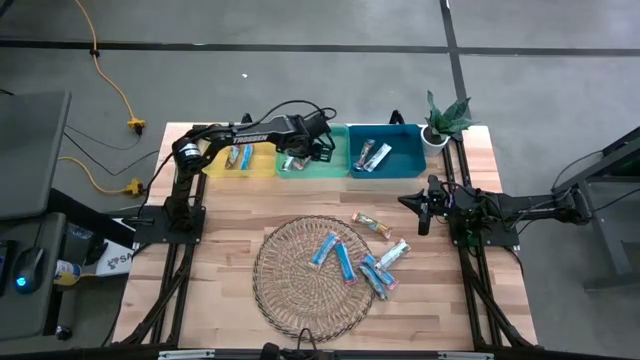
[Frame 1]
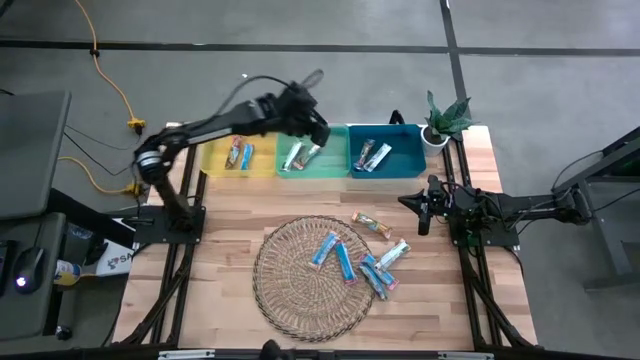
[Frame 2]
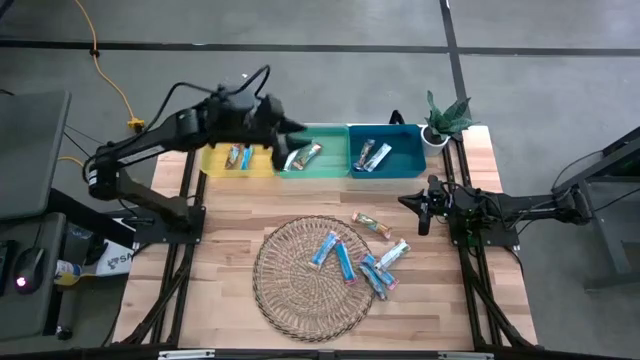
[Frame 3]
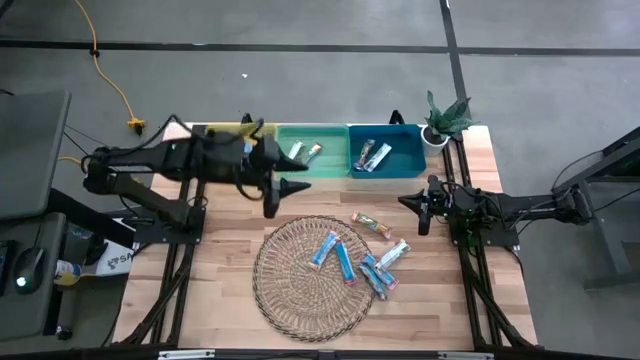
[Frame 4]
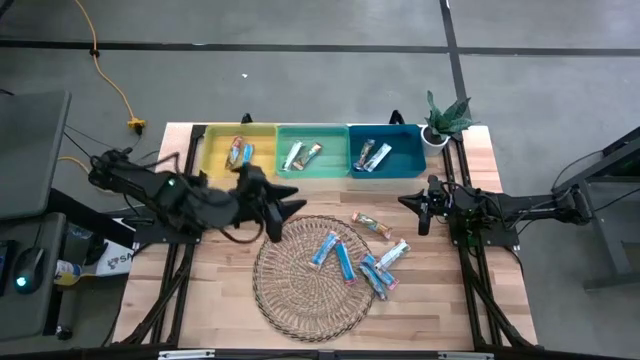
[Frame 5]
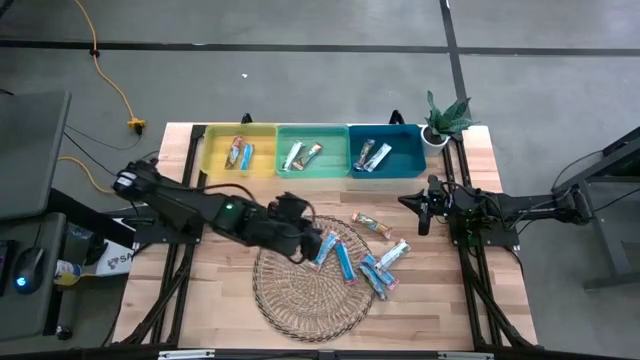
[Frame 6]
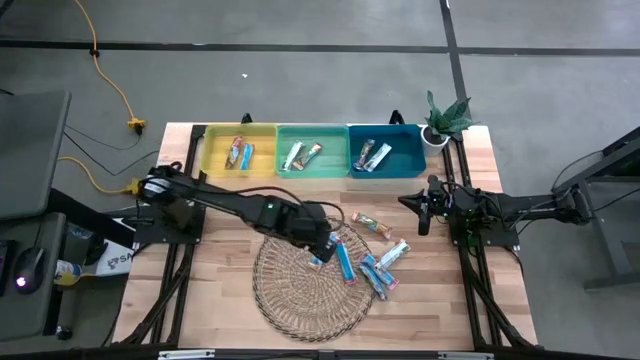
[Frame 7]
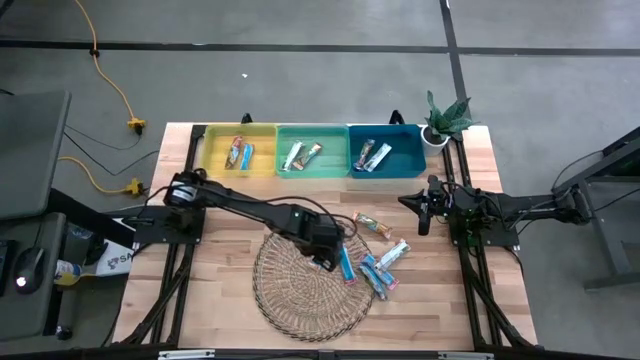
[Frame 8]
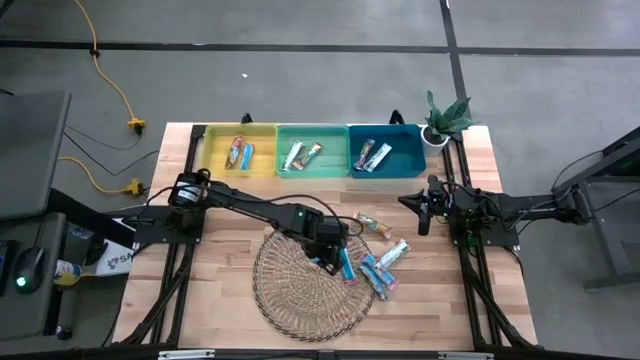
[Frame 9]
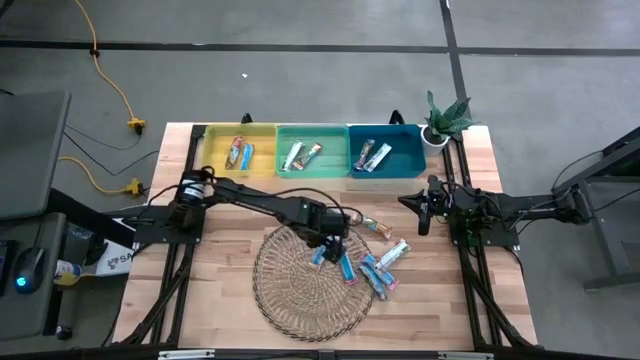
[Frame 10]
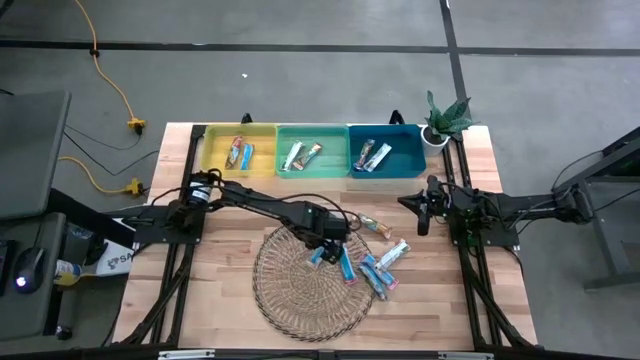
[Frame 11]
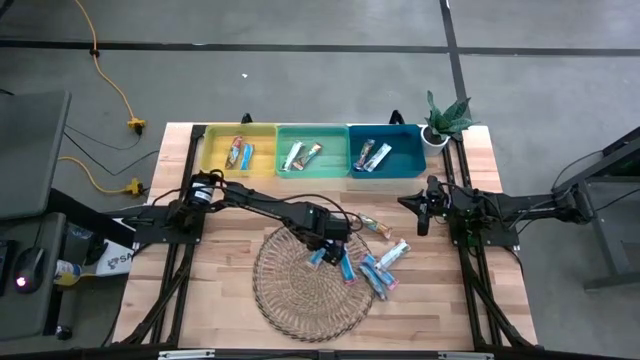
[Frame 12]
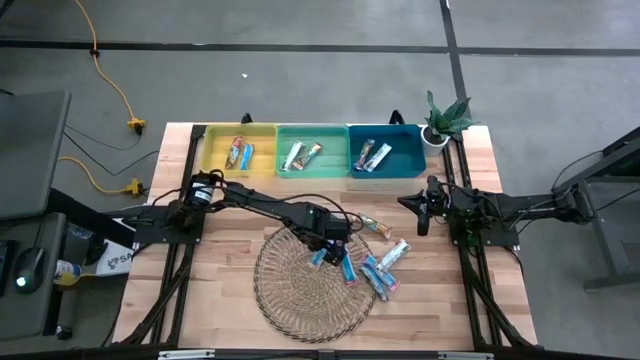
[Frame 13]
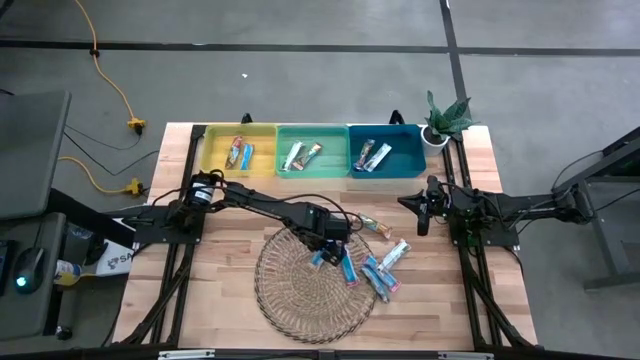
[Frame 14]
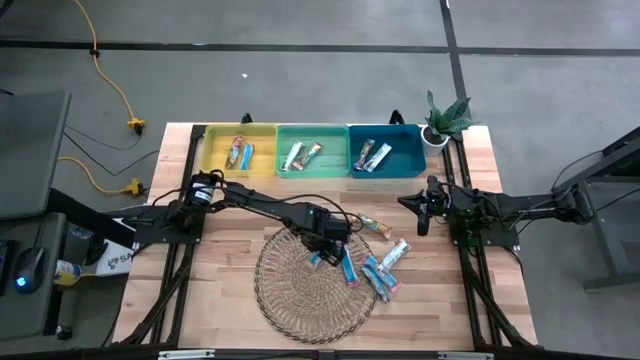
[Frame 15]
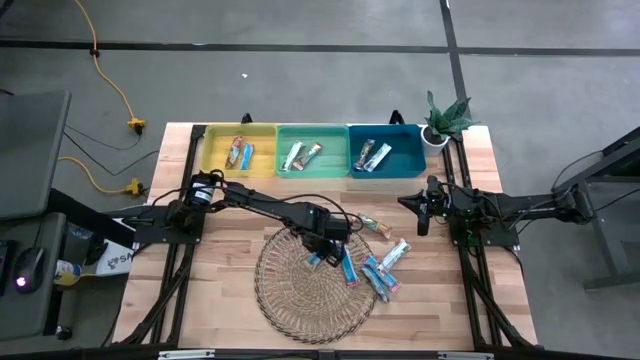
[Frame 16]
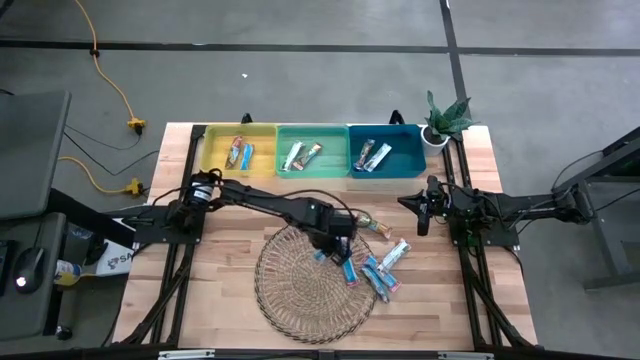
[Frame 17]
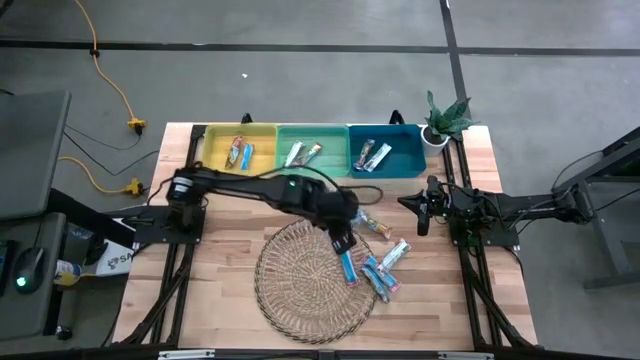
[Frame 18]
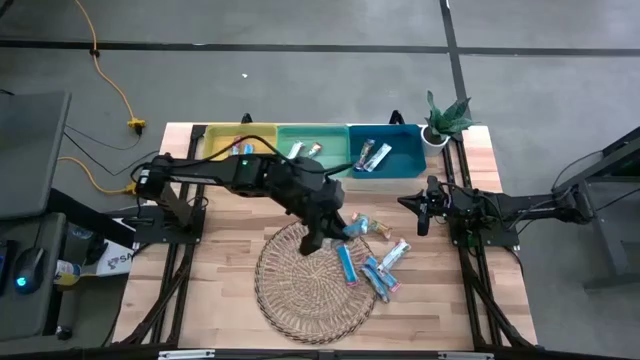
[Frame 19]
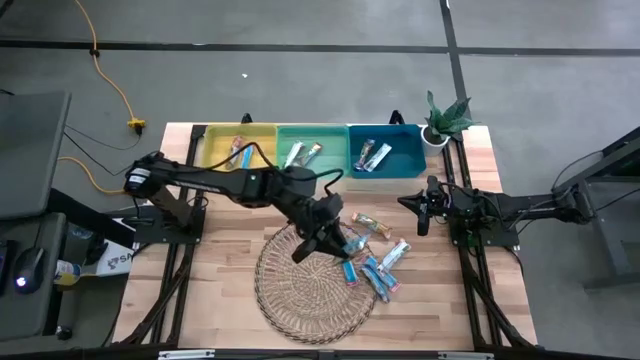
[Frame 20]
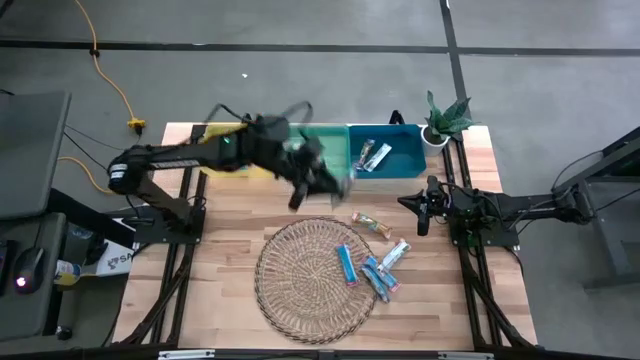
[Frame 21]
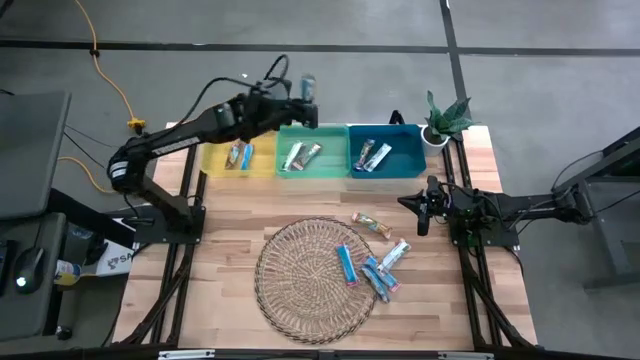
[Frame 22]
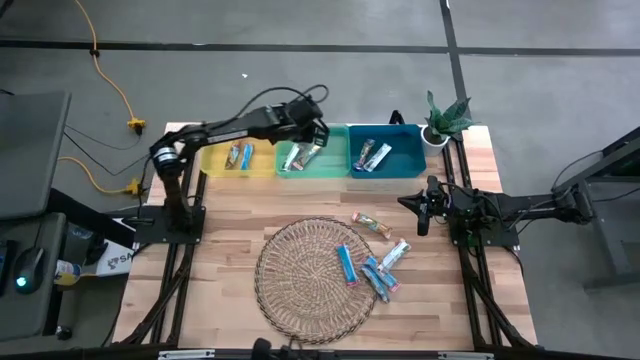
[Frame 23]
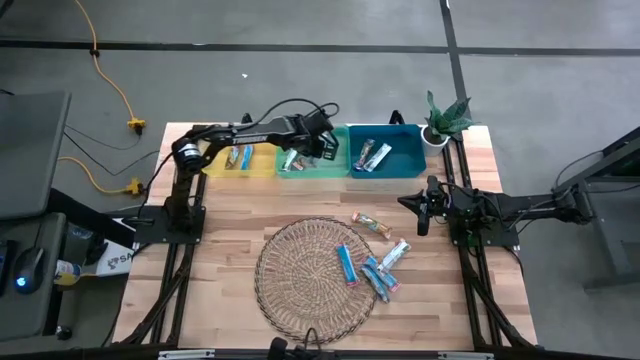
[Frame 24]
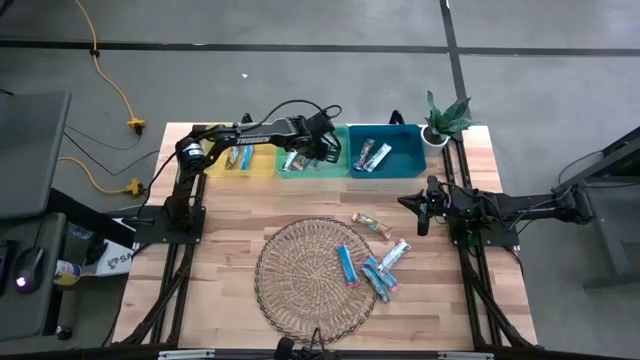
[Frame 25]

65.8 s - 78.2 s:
Task: Pick and place Granola Bars by type
Put the yellow granola bar into the green bin

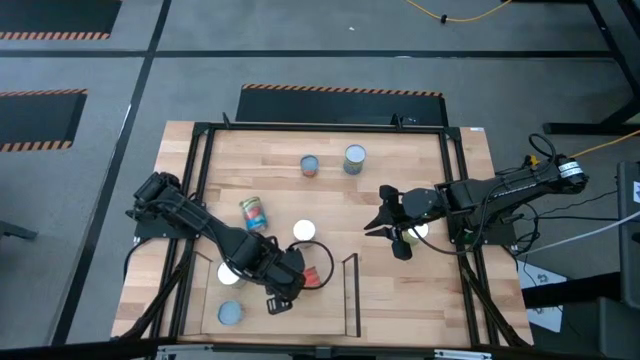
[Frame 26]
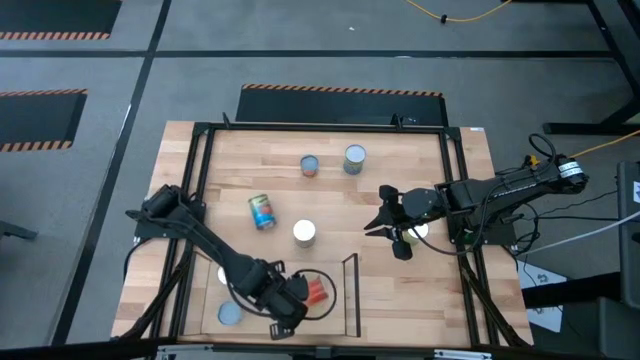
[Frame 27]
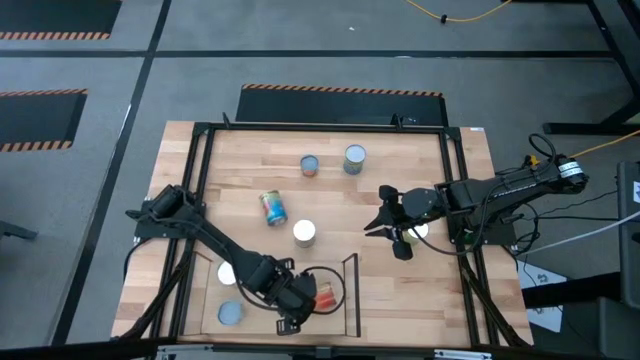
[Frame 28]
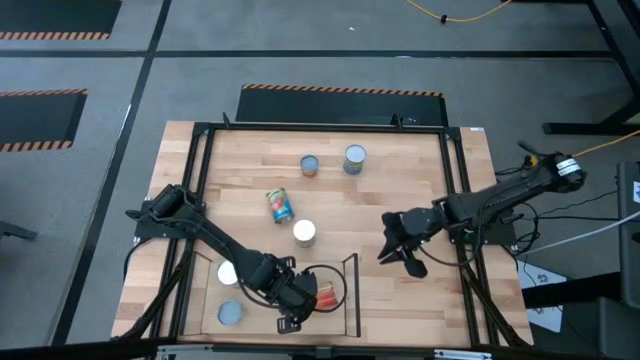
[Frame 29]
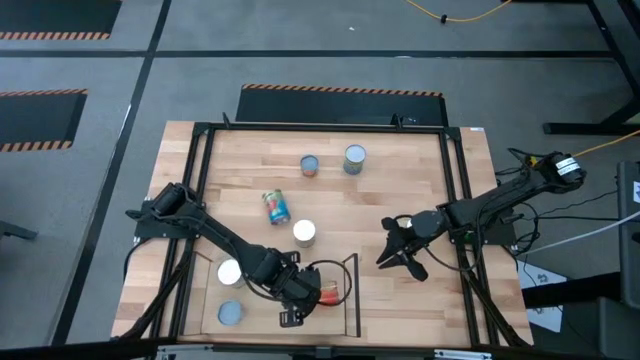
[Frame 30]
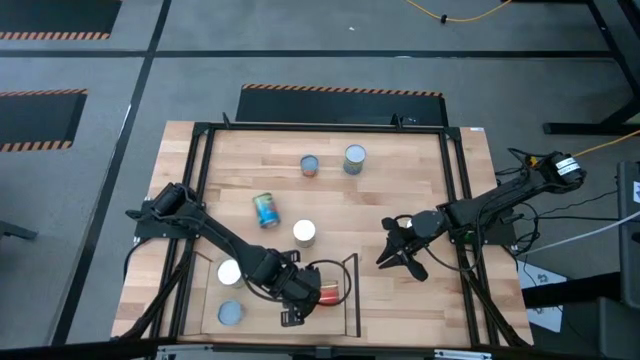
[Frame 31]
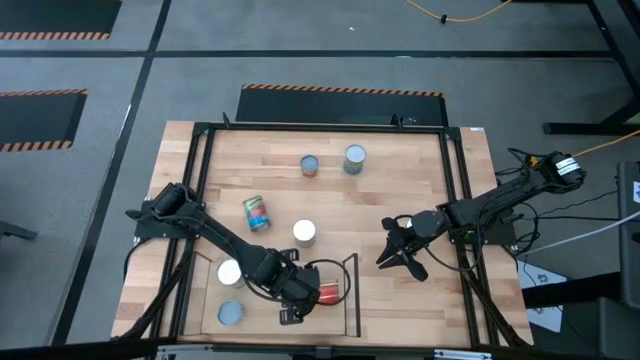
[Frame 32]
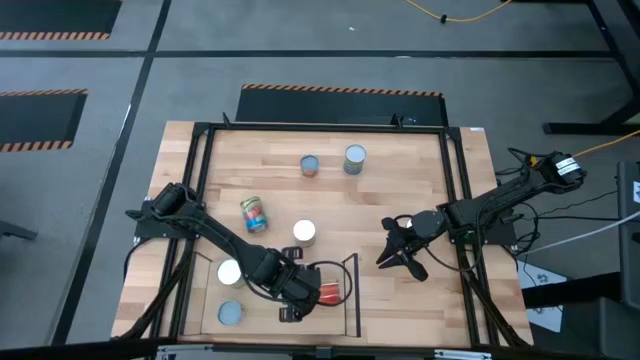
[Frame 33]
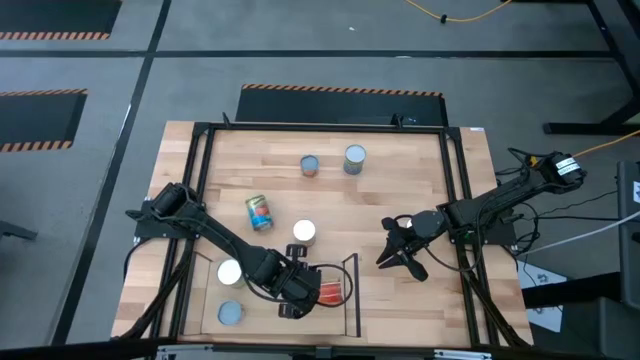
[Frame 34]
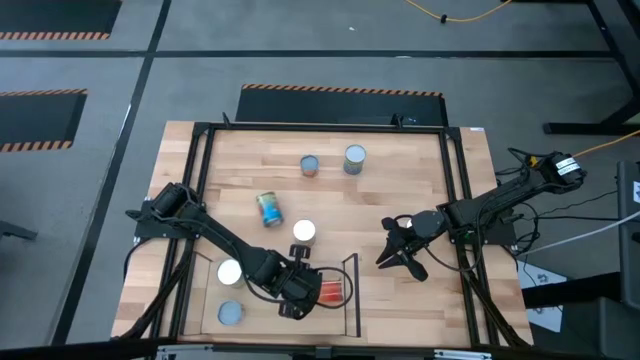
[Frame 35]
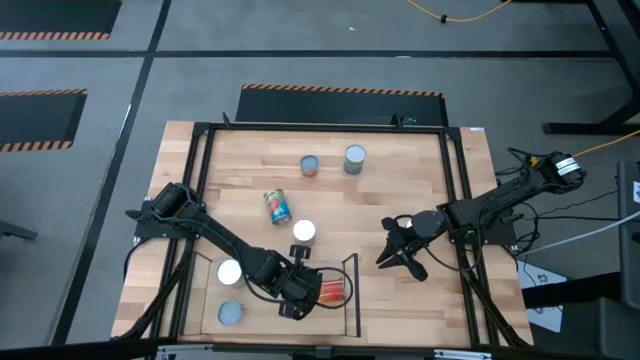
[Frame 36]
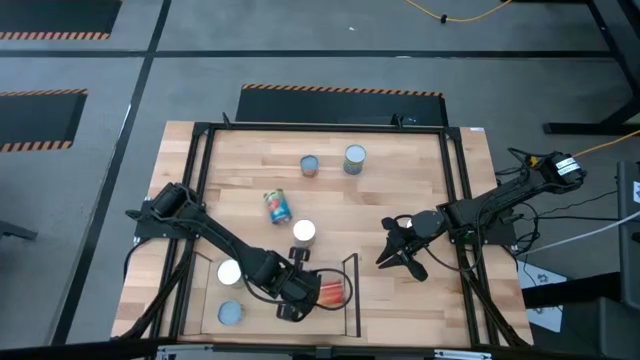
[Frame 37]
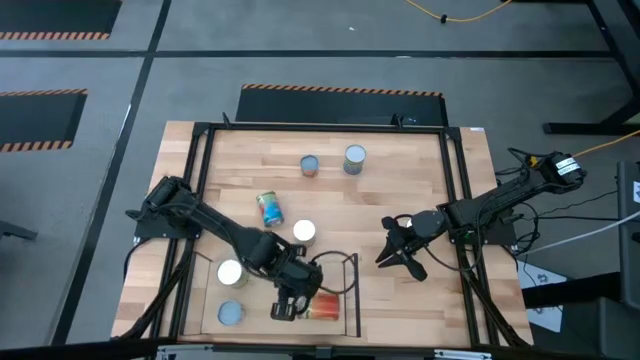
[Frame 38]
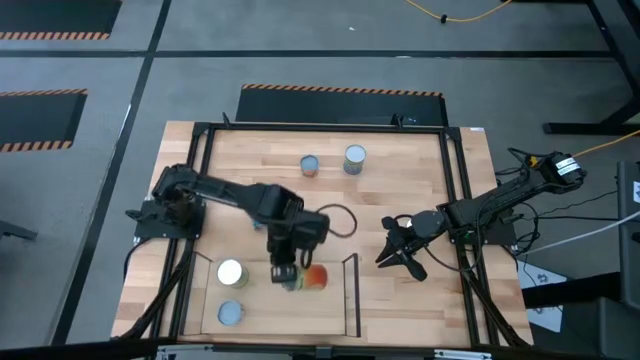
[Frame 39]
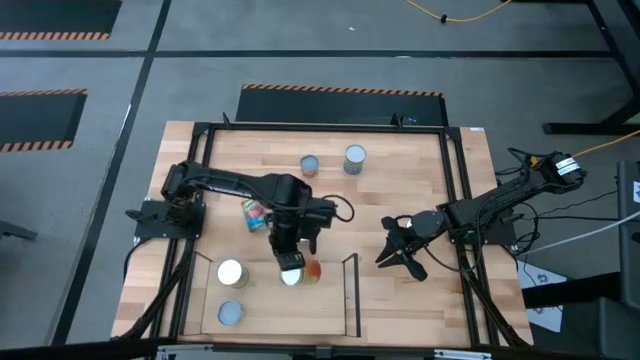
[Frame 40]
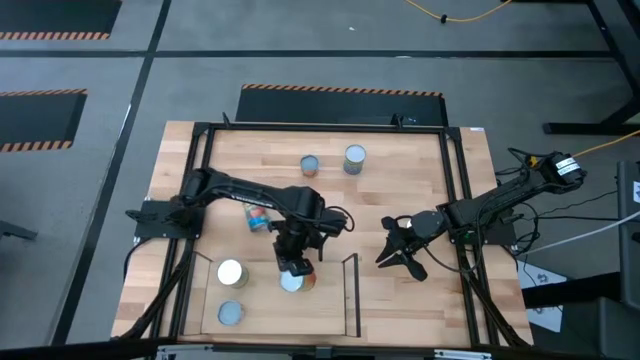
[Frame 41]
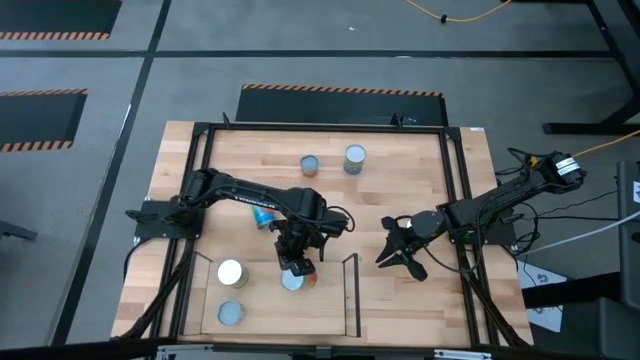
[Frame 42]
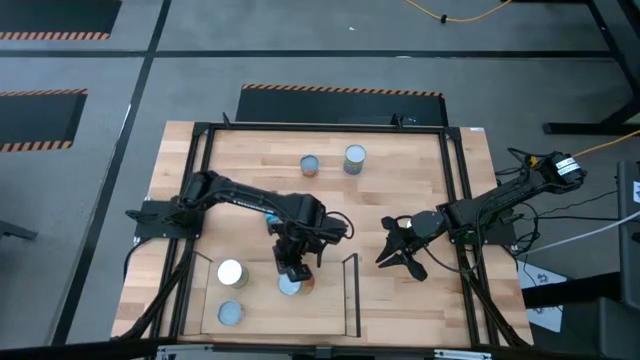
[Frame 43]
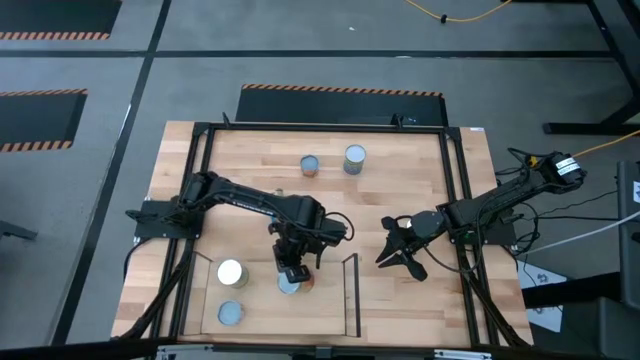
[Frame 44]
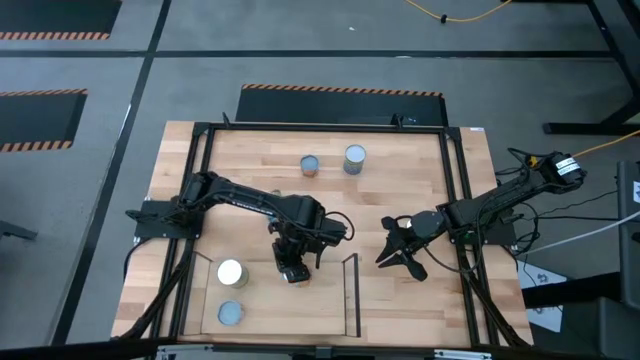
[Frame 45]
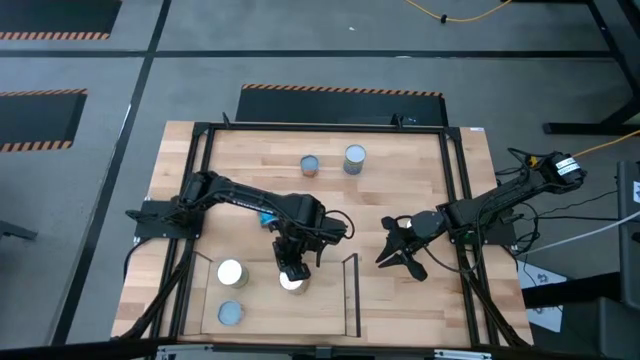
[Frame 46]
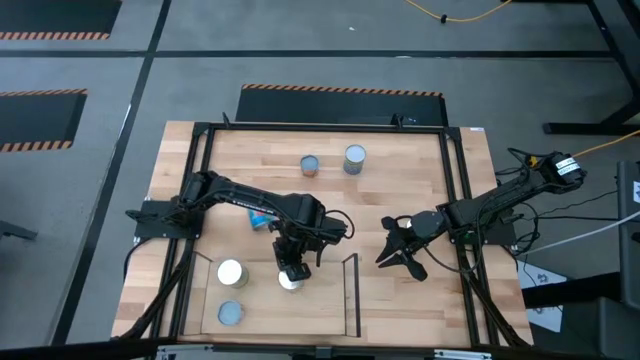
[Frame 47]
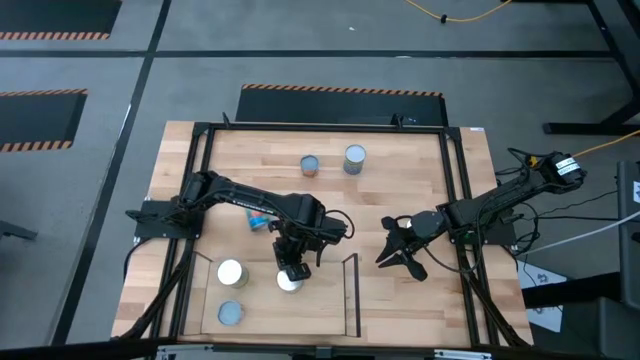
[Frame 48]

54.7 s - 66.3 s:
Task: Pick and place cans onto a shelf
Put the canned pineapple on the shelf
